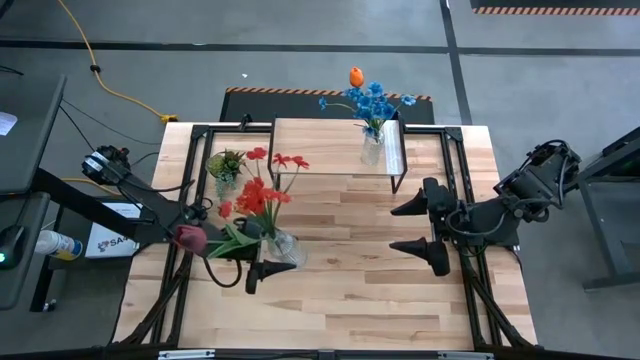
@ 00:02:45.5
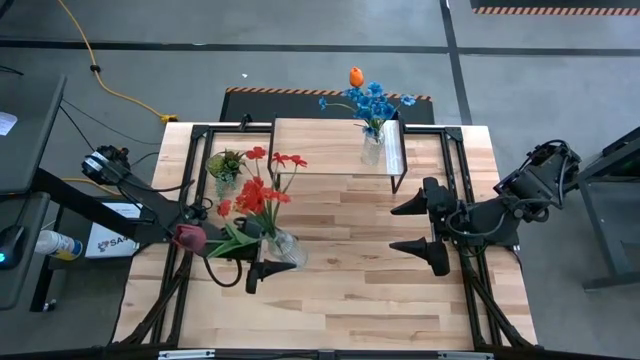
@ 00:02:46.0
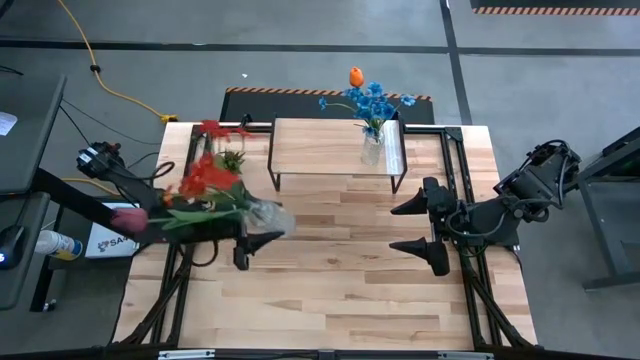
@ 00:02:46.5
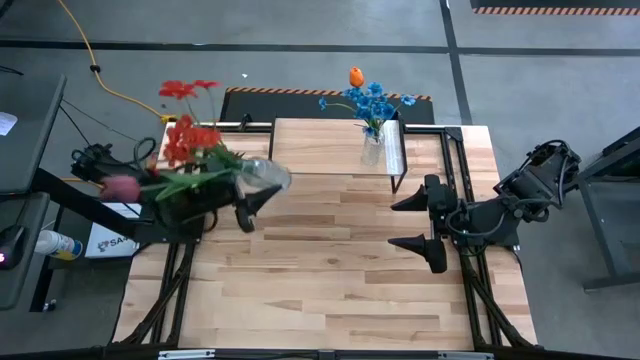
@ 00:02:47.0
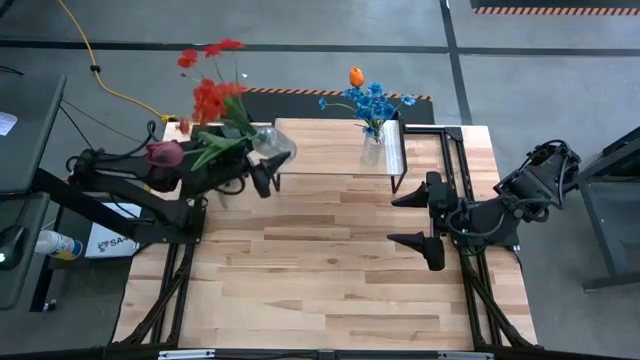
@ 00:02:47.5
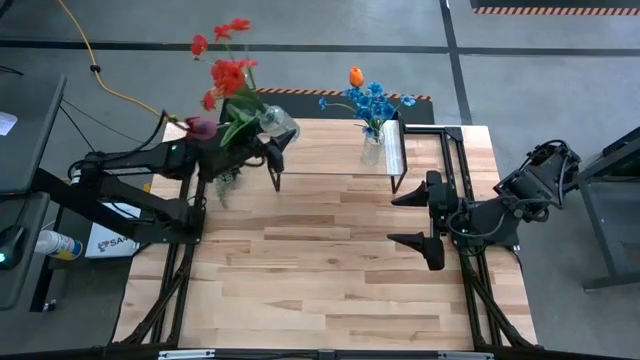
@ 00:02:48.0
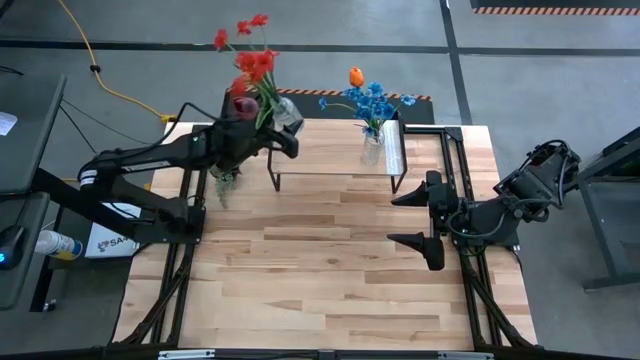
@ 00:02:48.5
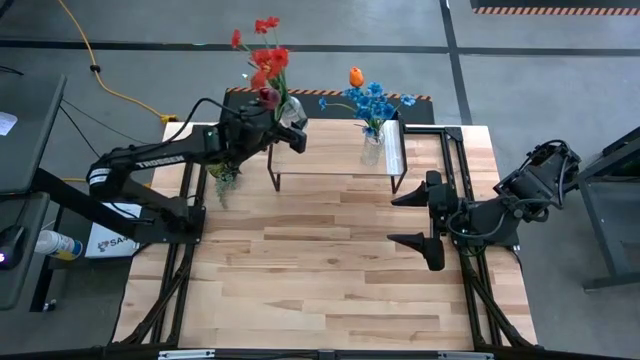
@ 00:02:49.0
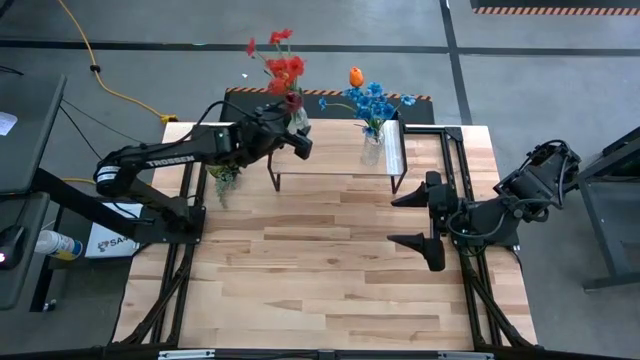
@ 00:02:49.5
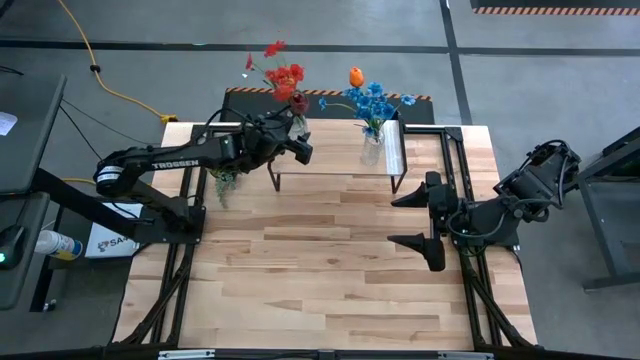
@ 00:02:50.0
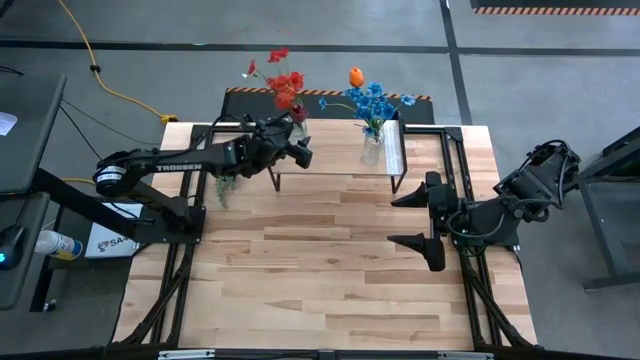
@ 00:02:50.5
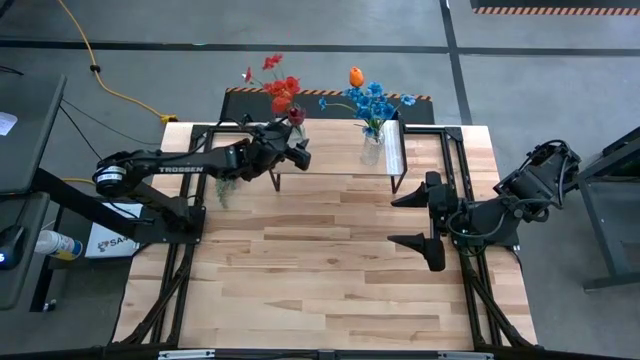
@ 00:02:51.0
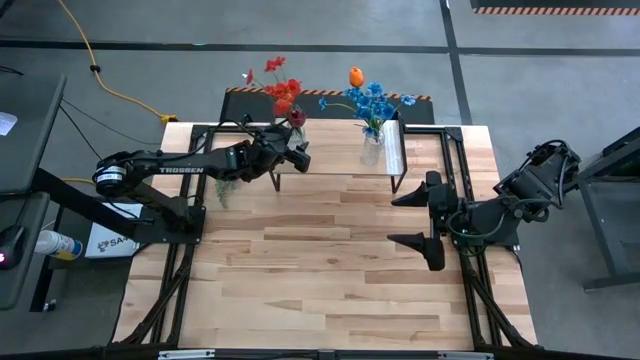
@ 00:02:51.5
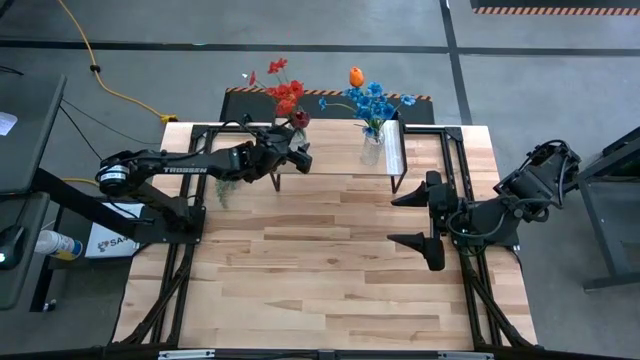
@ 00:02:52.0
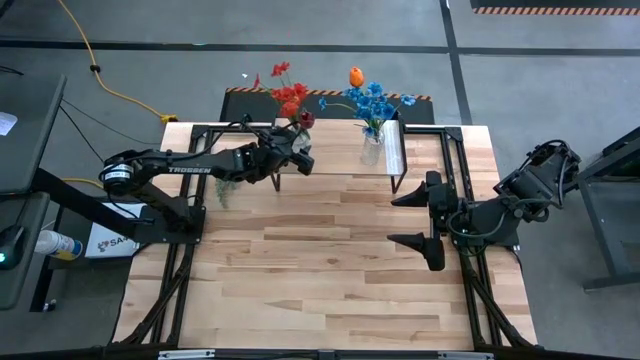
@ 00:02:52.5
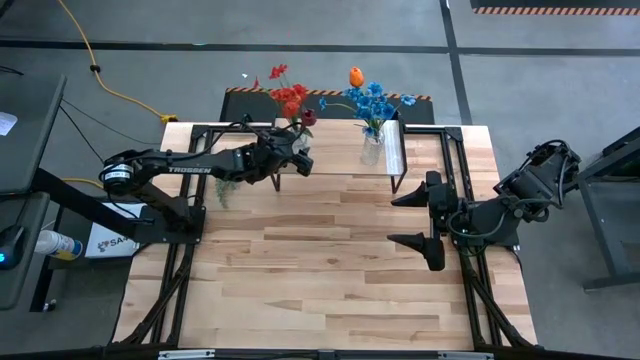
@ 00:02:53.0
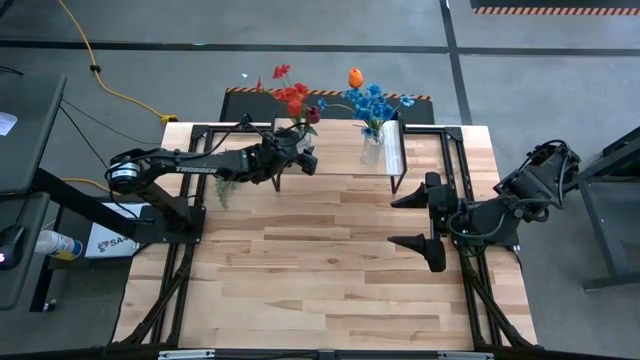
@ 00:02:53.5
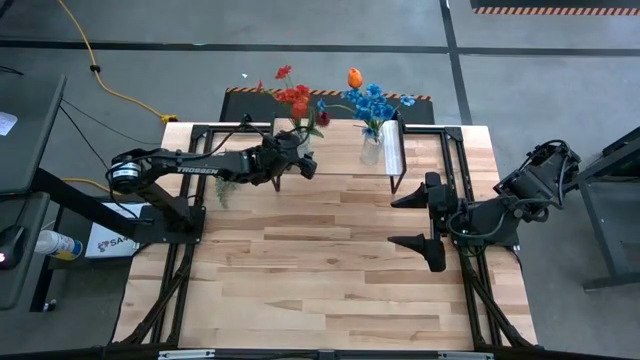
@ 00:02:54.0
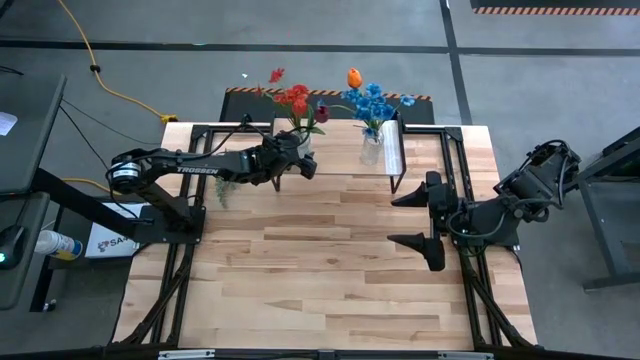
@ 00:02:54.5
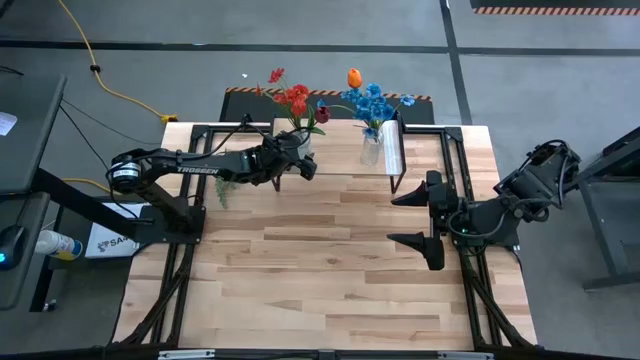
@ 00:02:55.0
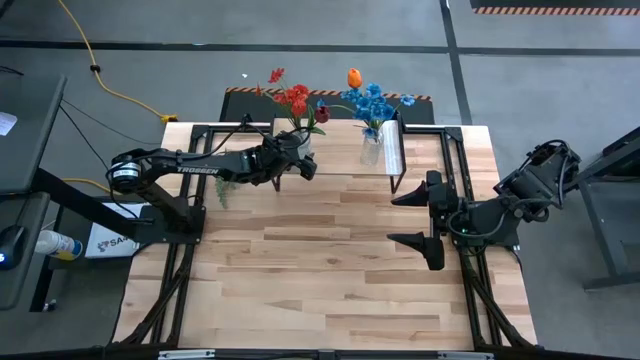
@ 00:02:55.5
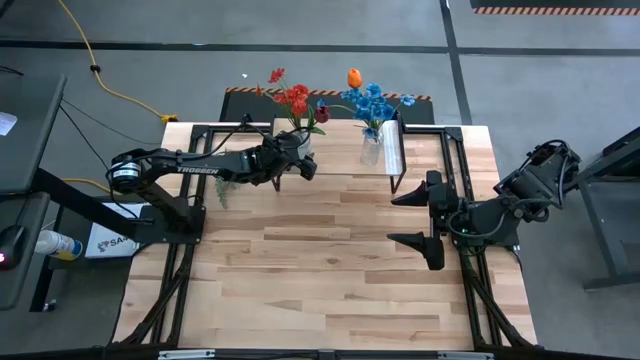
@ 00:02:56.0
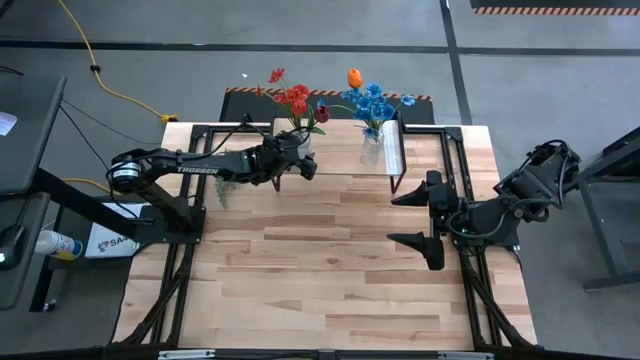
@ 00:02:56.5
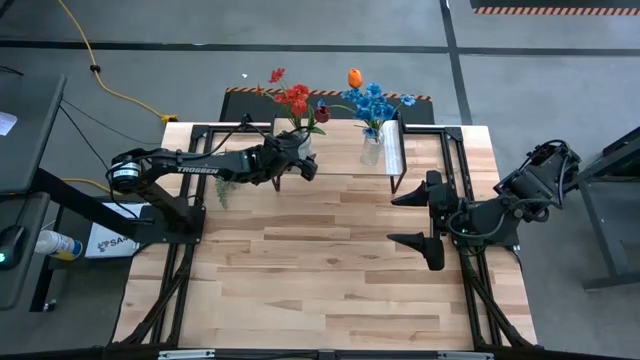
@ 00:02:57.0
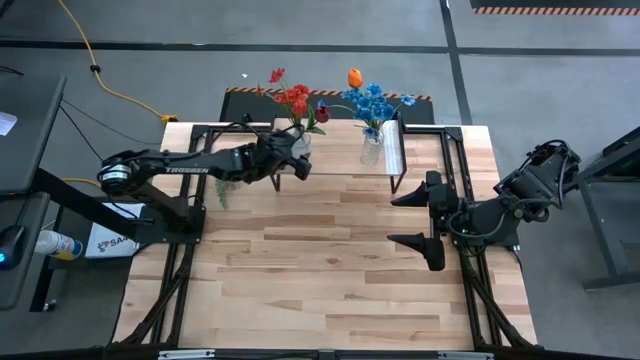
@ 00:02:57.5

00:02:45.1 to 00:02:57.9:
Task: Pick and place flowers into a vace then onto a shelf
Put the transparent vase with flowers on the shelf
